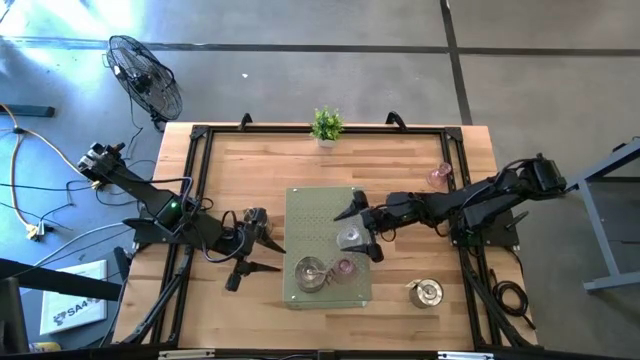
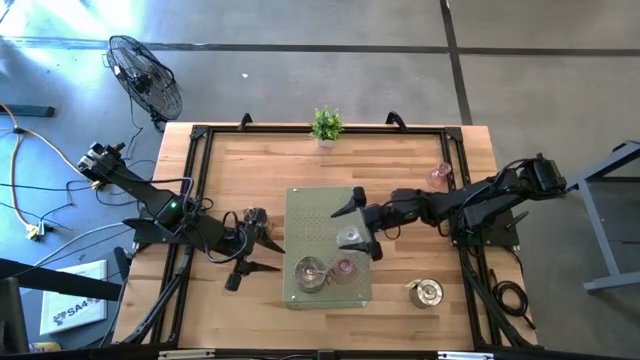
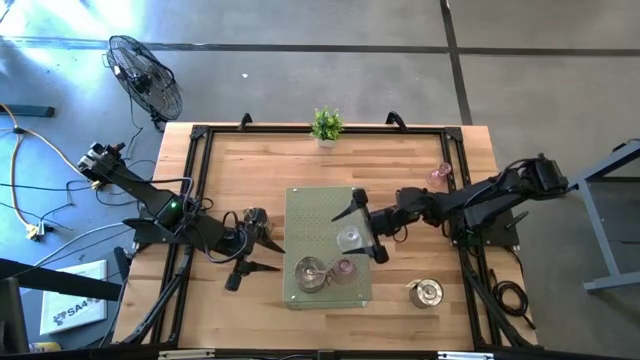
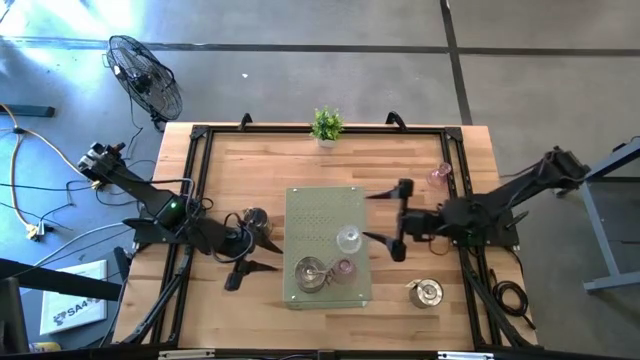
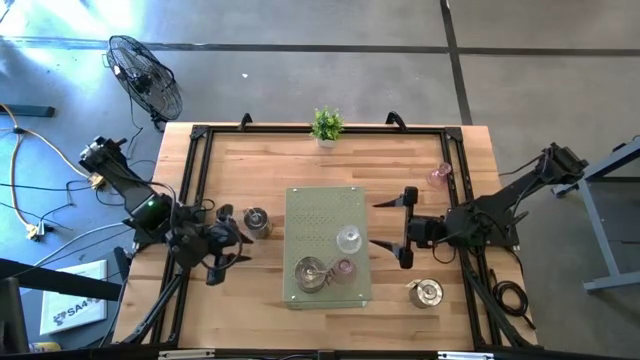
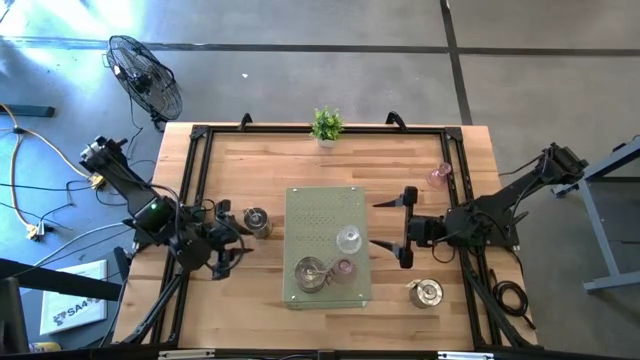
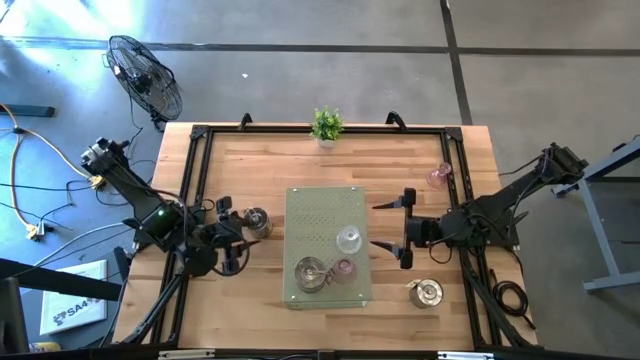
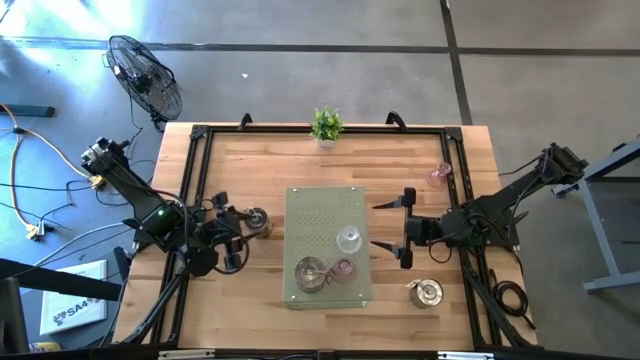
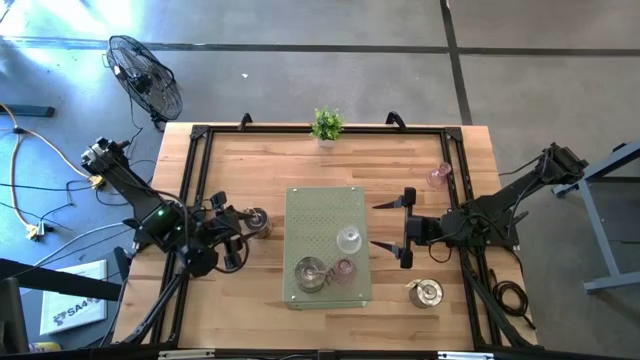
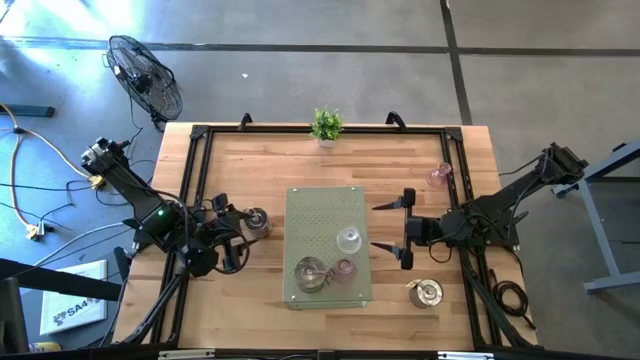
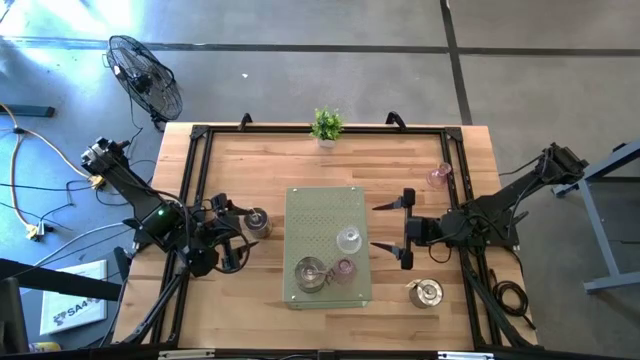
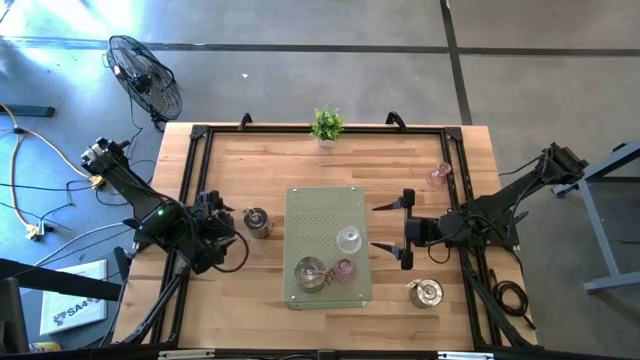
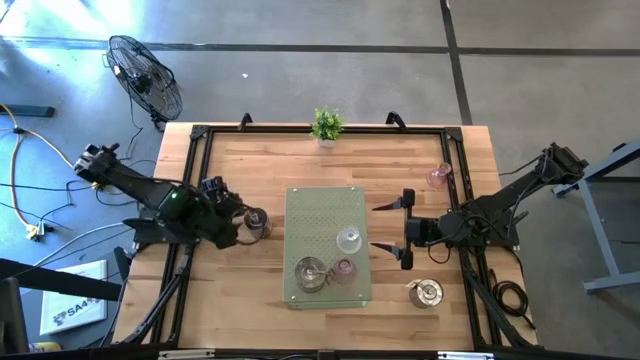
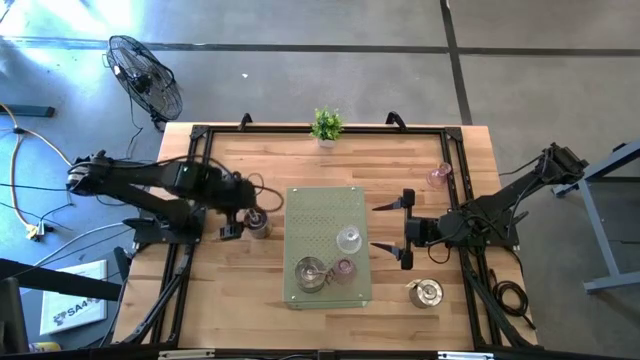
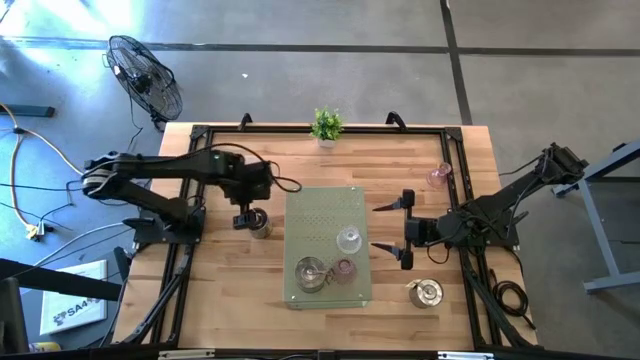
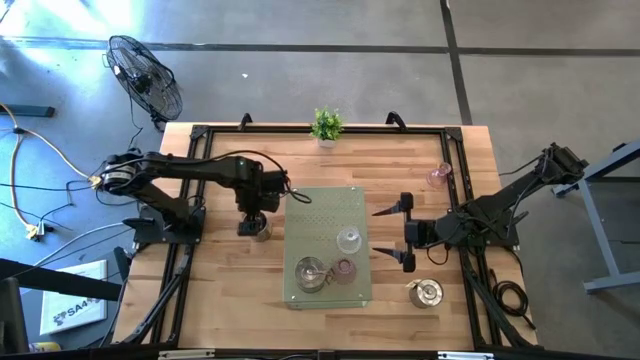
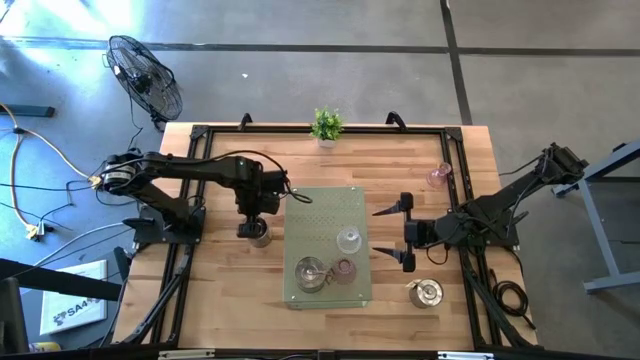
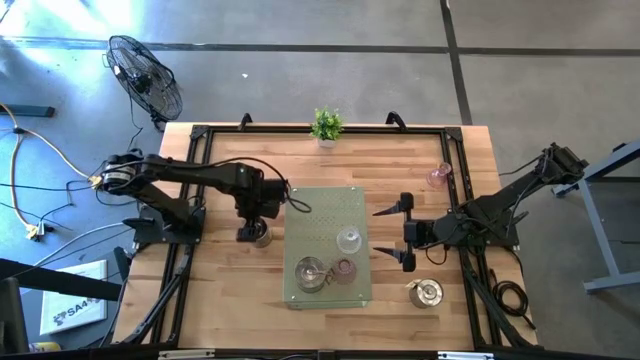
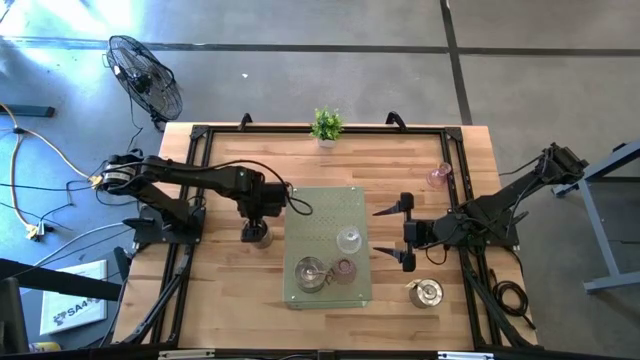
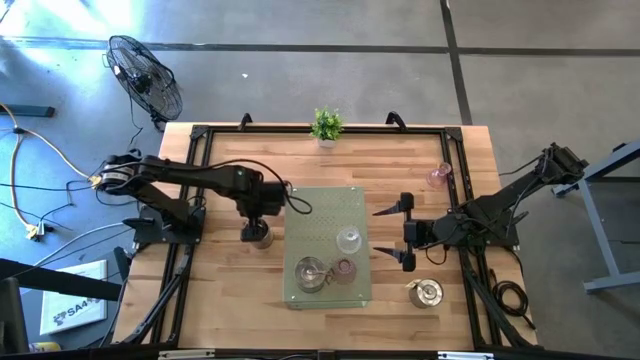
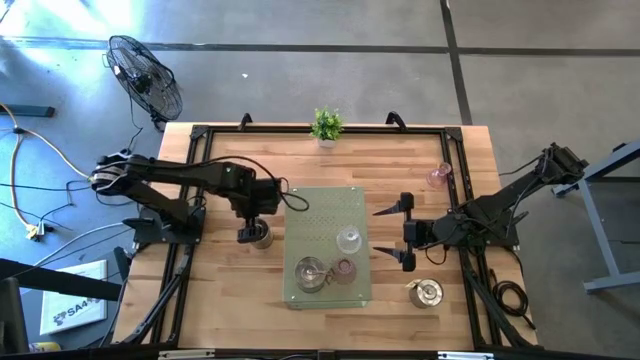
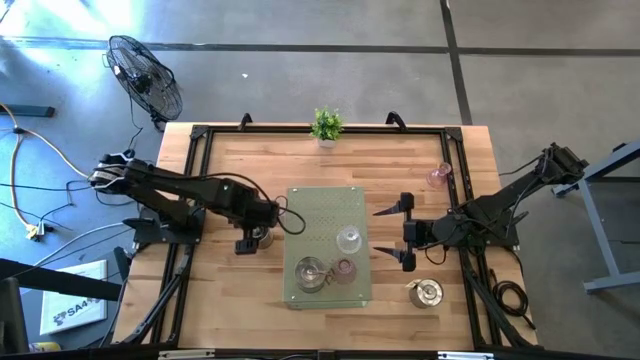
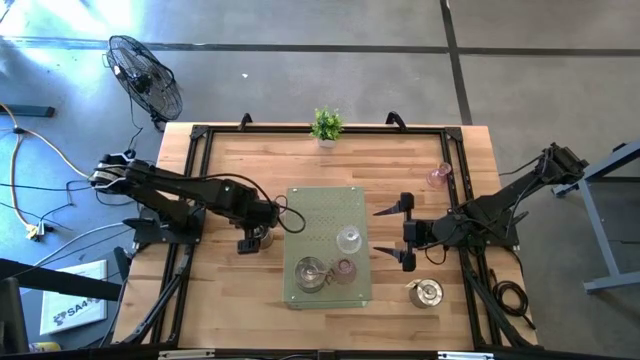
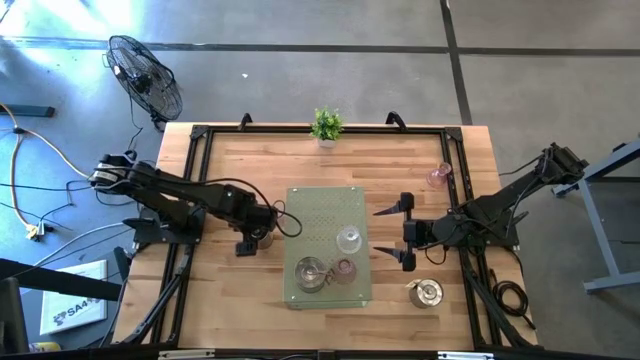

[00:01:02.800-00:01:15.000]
Task: Pick & Place candle stick holders
Put the left green scented candle on the shelf aligned with the transparent candle holder

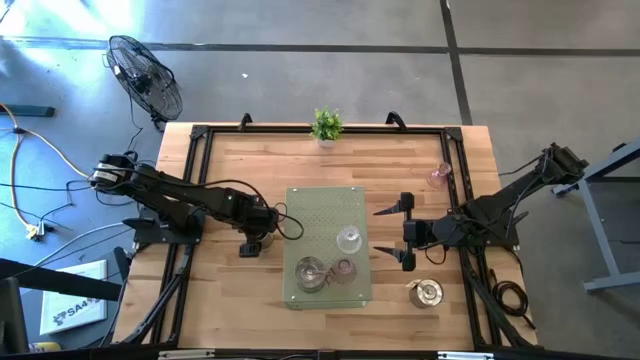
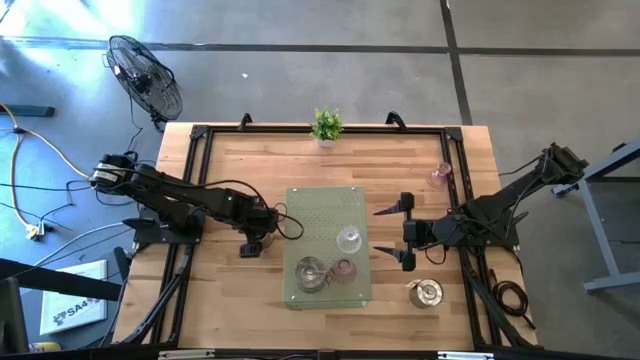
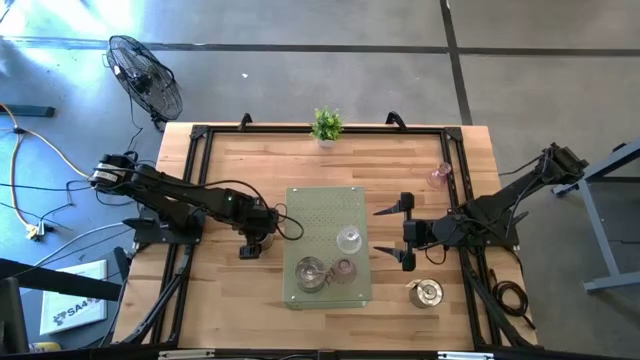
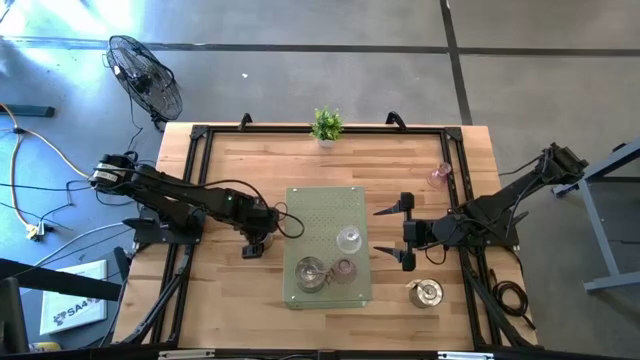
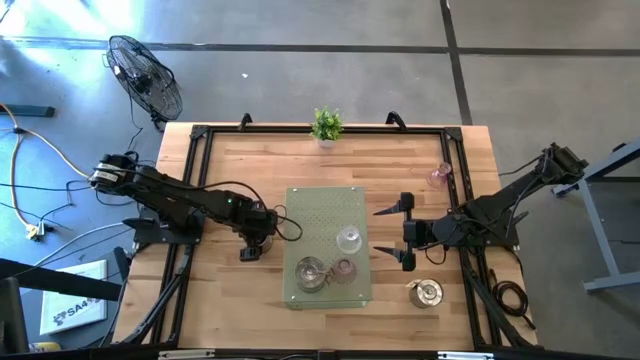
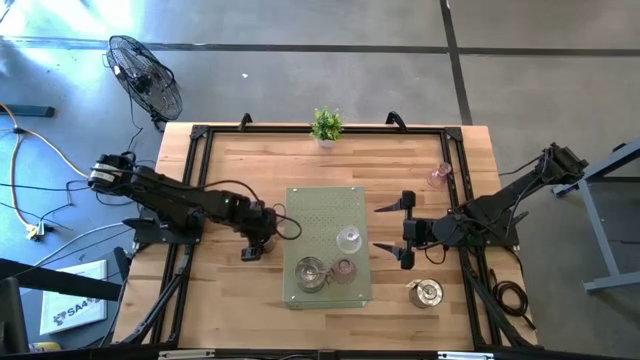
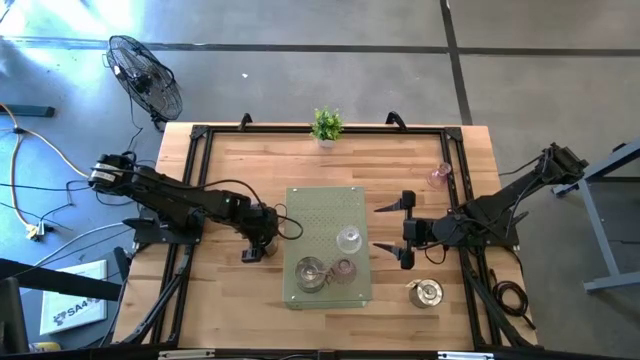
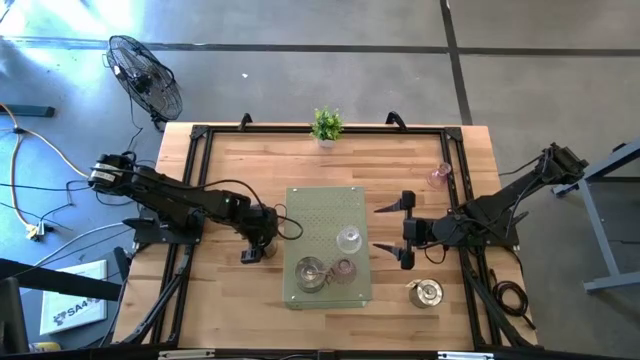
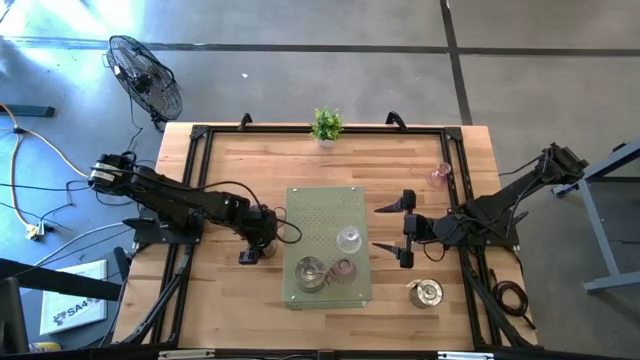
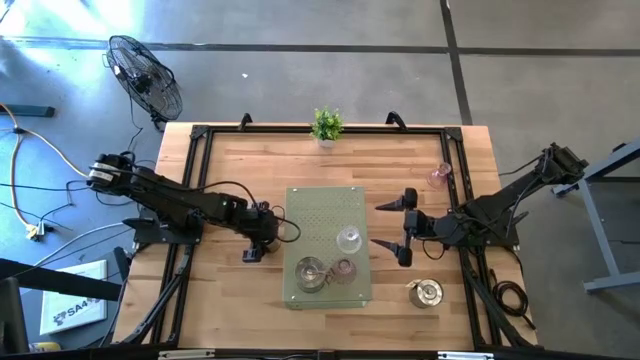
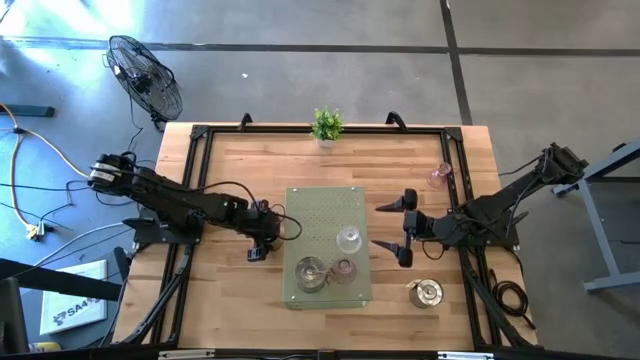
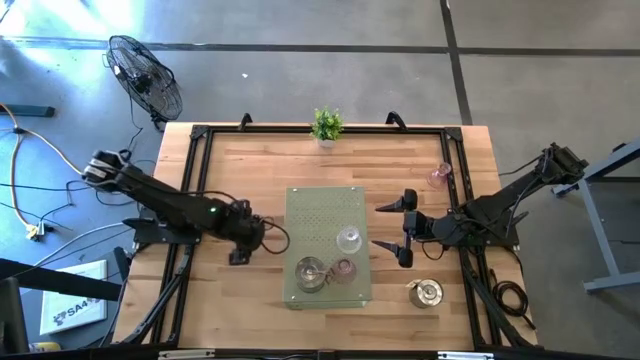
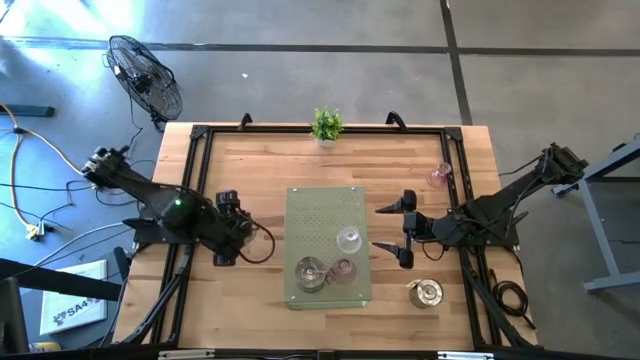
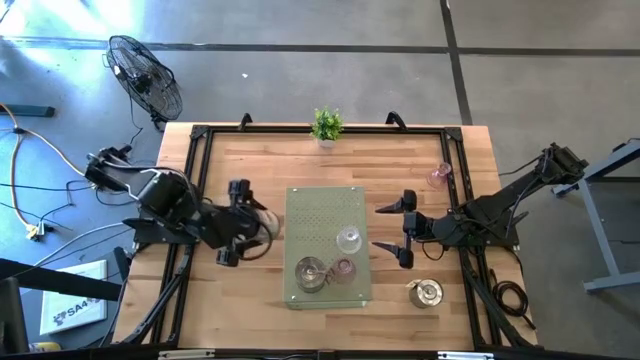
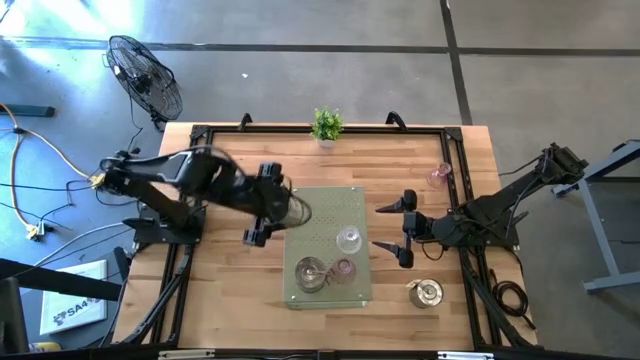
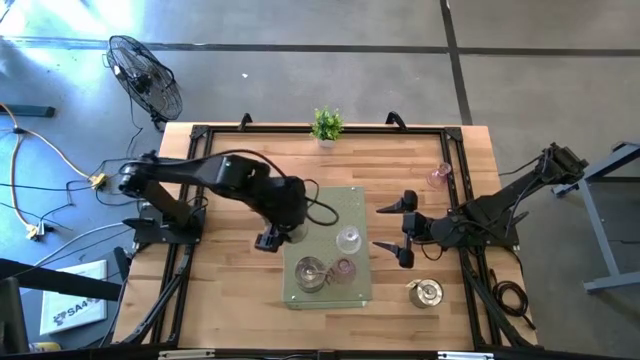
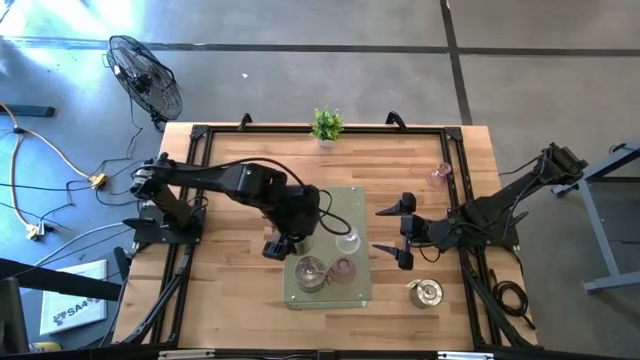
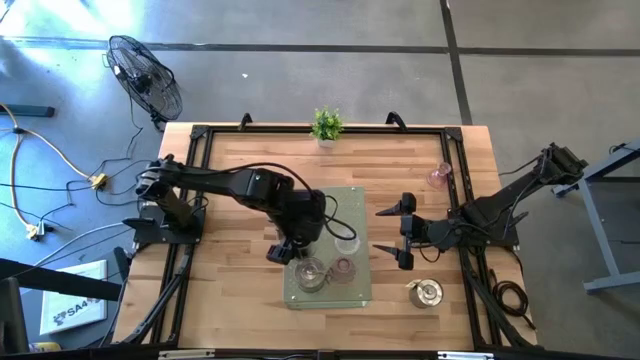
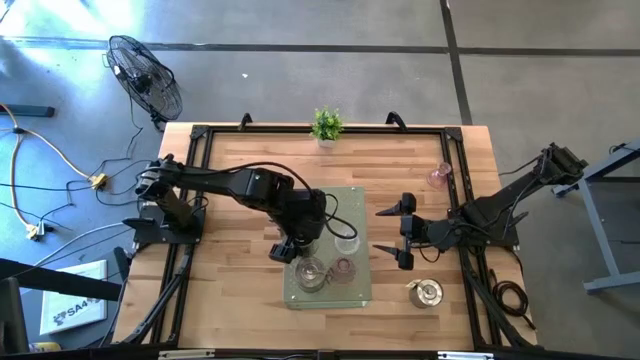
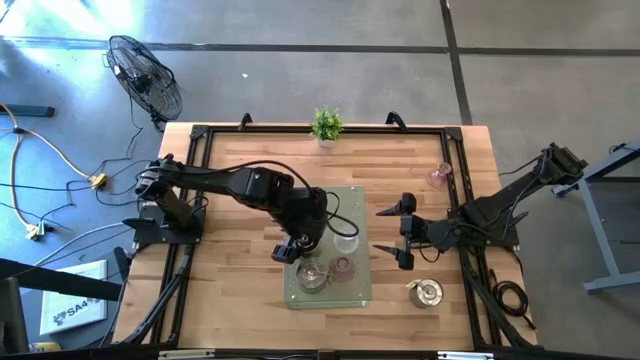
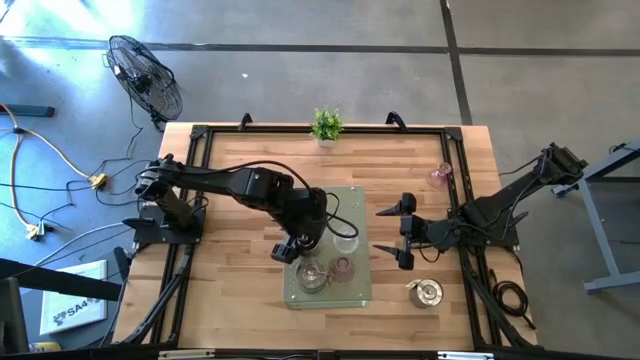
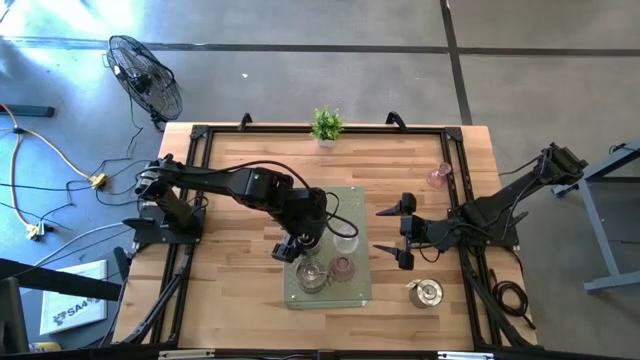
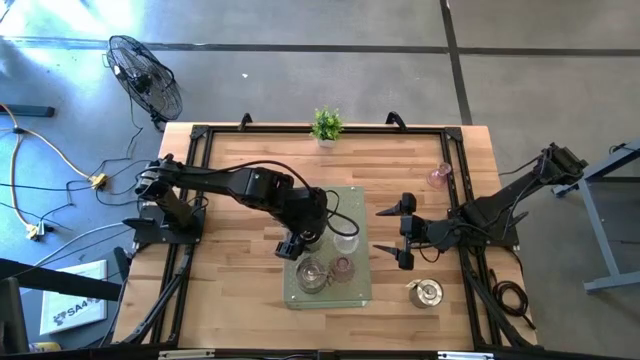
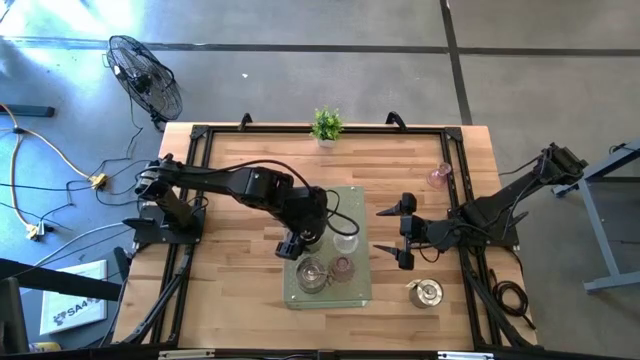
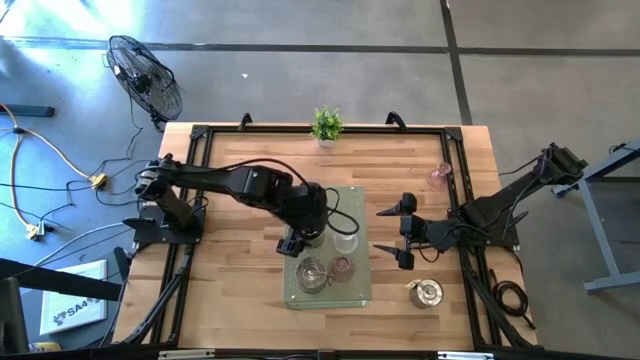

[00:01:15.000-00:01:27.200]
Put the left green scented candle on the shelf aligned with the transparent candle holder
